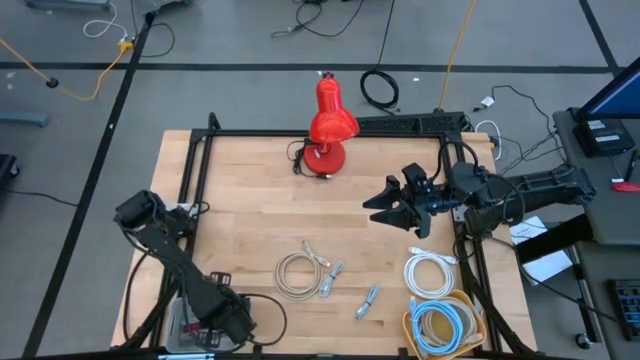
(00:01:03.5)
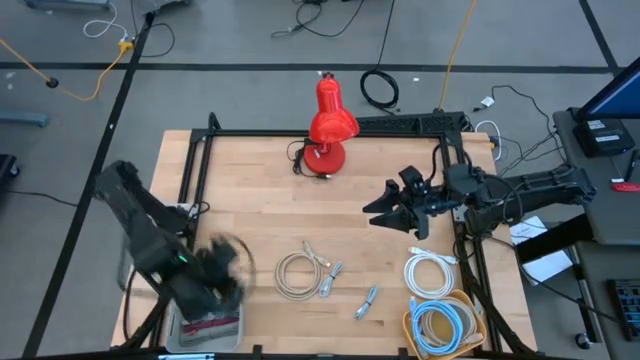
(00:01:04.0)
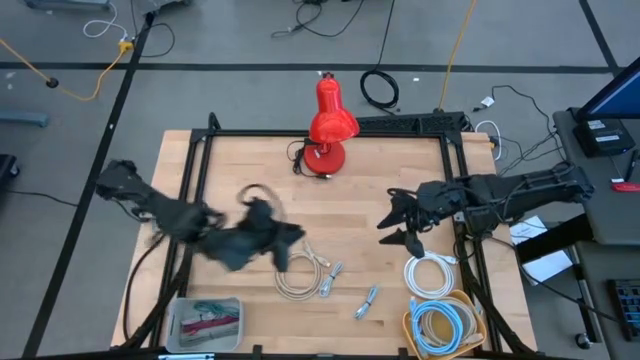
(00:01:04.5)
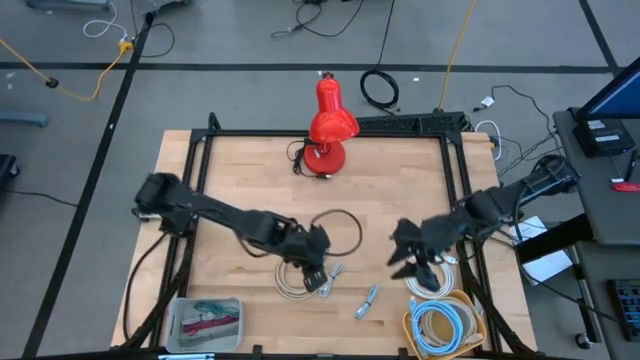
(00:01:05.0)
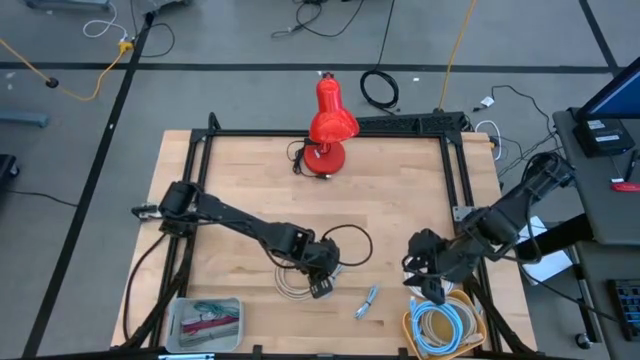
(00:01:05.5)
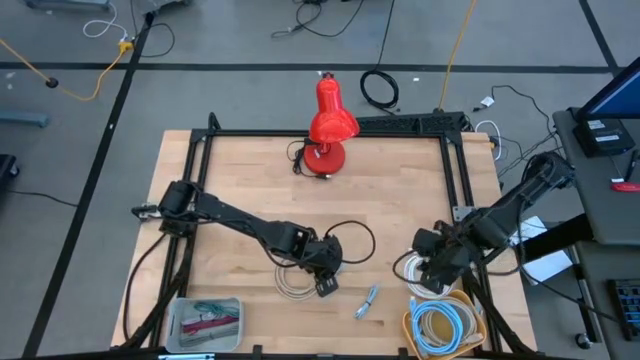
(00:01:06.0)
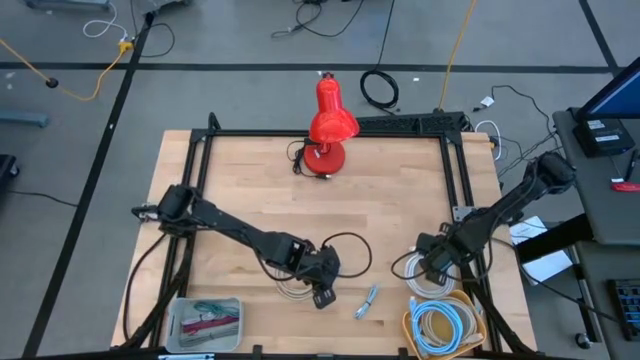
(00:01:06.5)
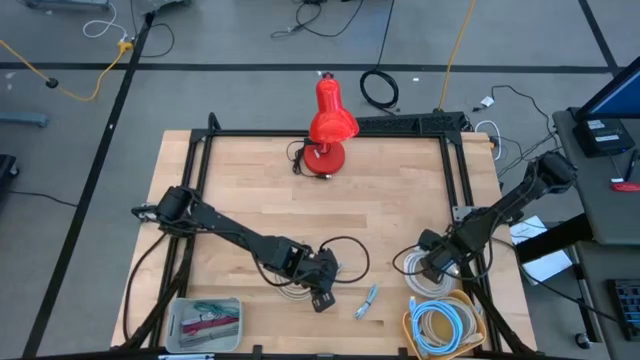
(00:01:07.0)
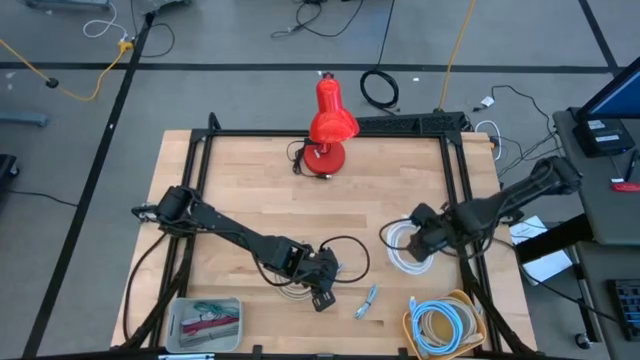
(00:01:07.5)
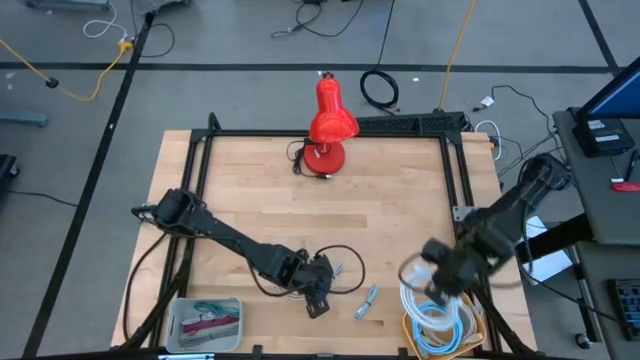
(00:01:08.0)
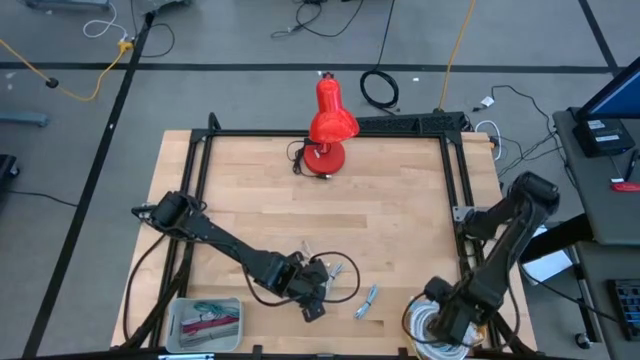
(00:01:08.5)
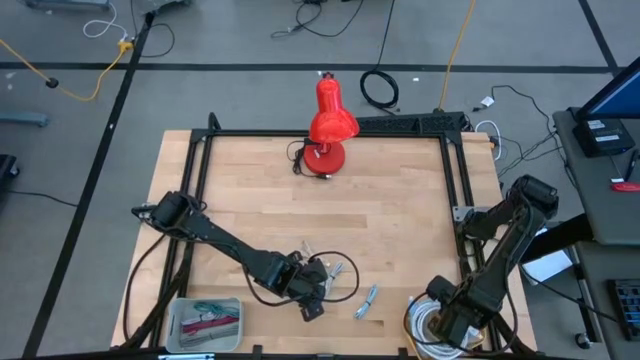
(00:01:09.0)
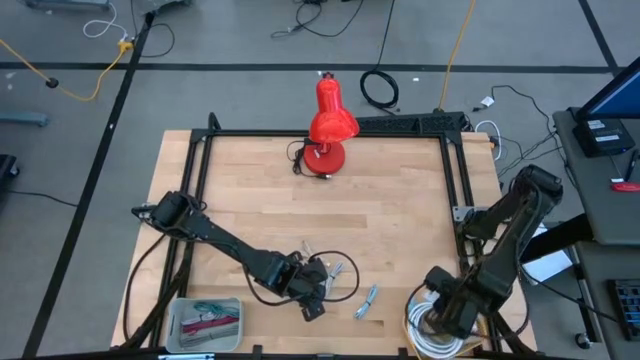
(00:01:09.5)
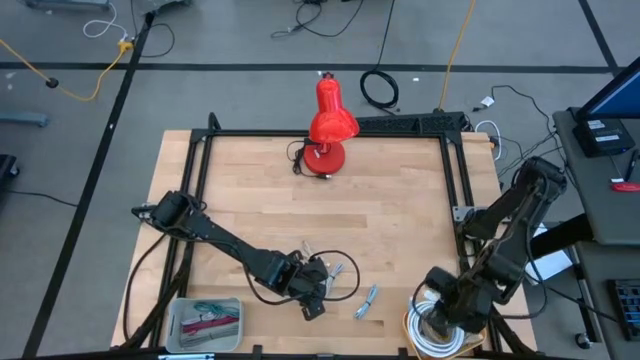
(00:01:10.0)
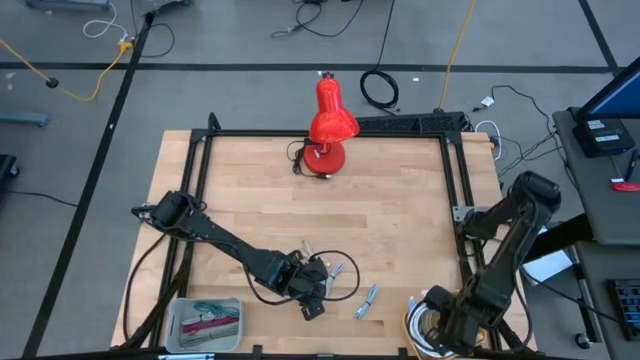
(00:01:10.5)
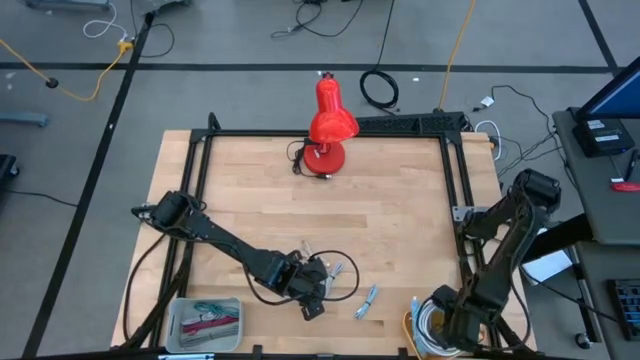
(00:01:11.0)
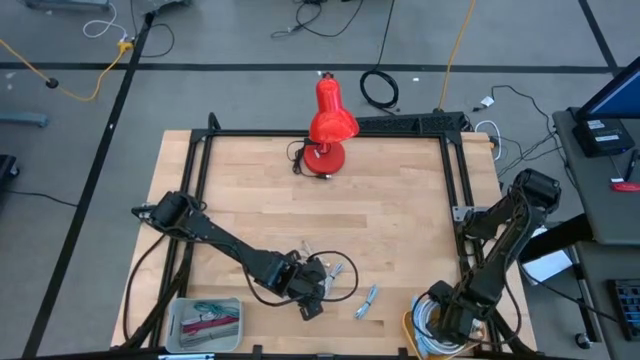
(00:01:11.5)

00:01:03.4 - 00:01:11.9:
Task: Pick & Place USB Port
Put the white HDMI cable into the yellow bin

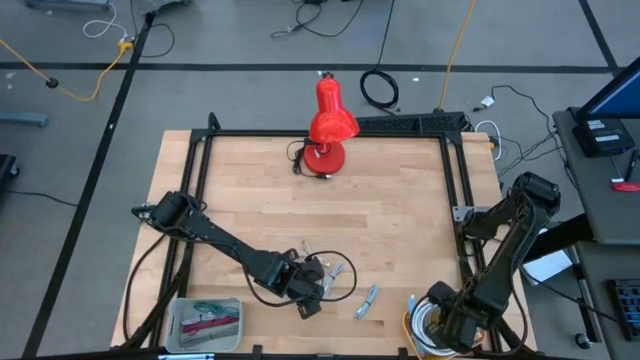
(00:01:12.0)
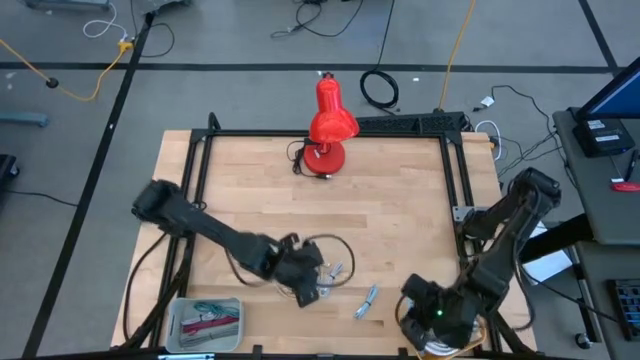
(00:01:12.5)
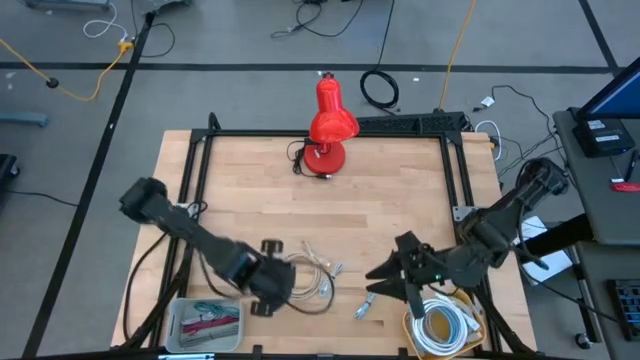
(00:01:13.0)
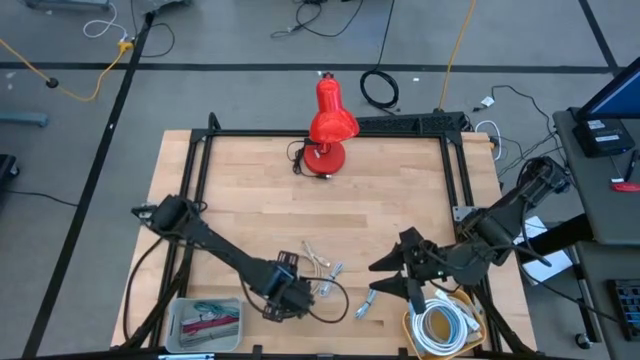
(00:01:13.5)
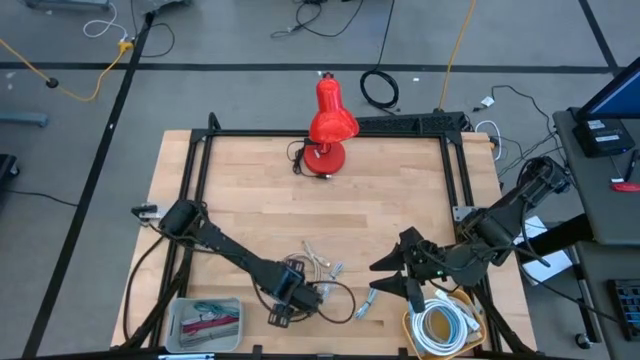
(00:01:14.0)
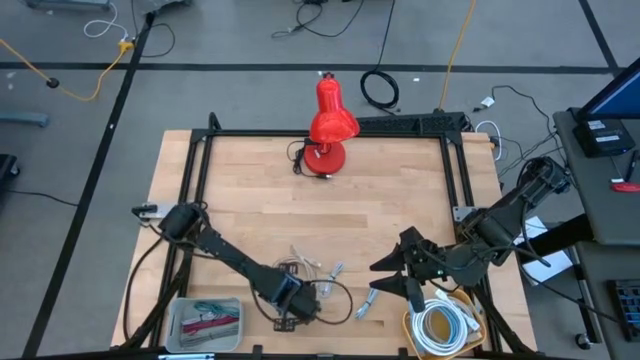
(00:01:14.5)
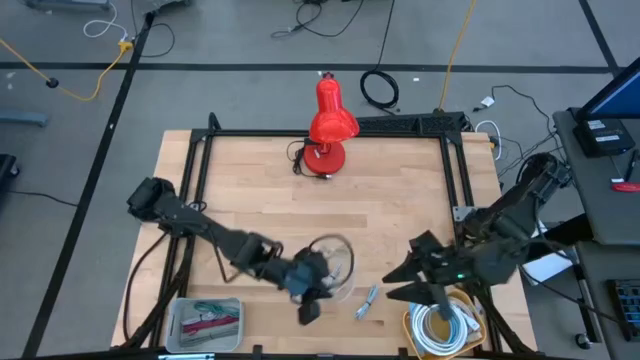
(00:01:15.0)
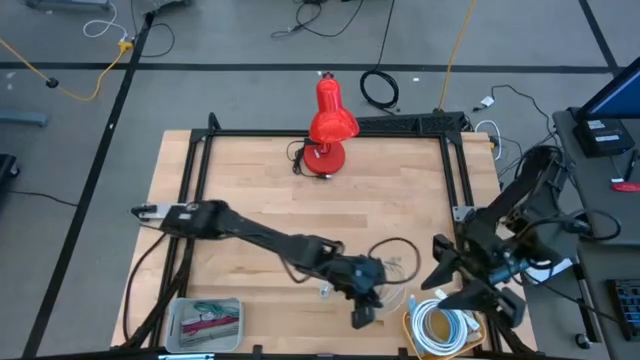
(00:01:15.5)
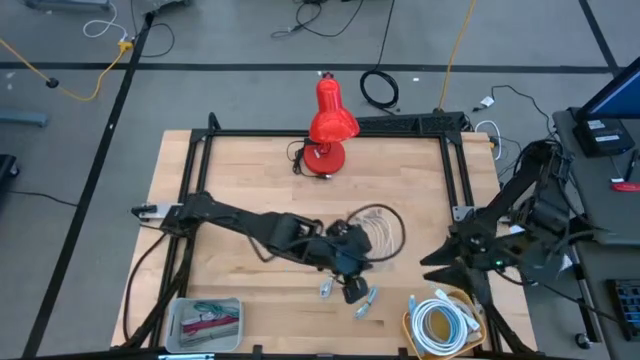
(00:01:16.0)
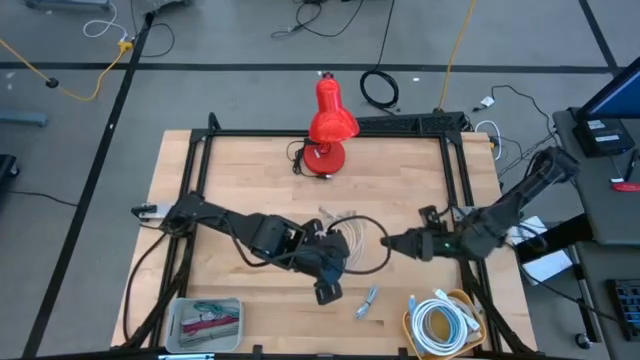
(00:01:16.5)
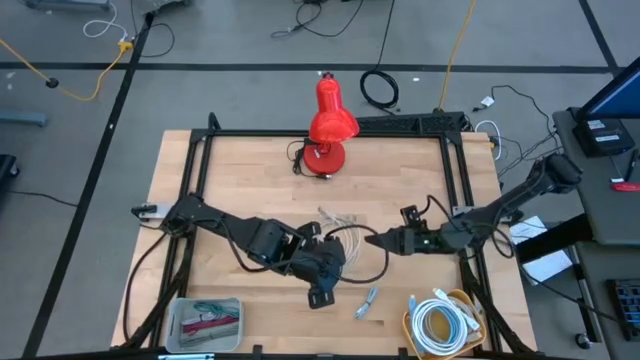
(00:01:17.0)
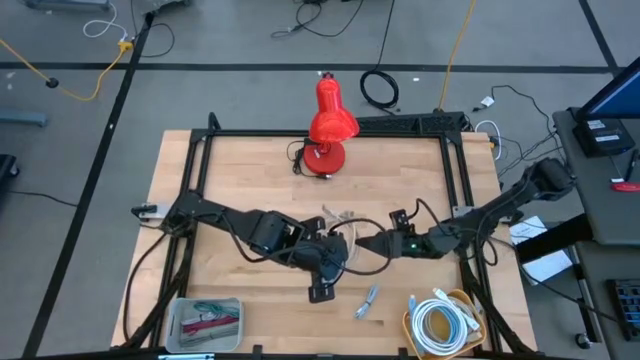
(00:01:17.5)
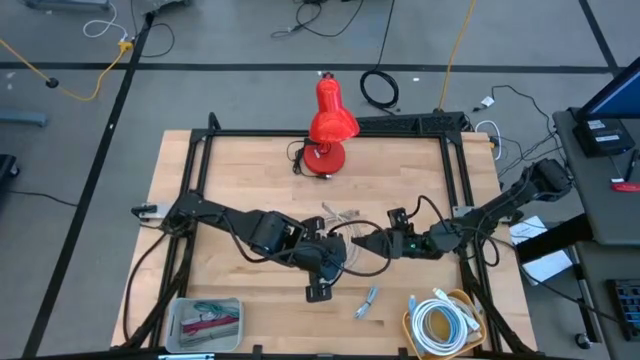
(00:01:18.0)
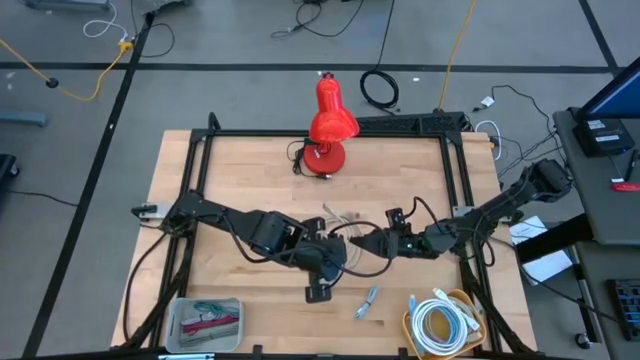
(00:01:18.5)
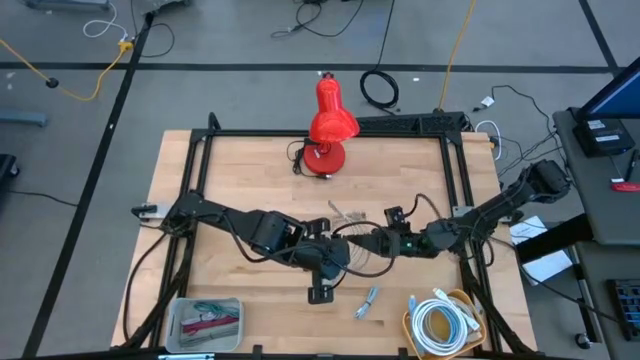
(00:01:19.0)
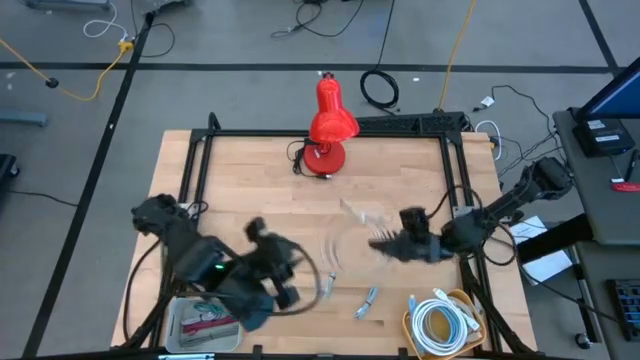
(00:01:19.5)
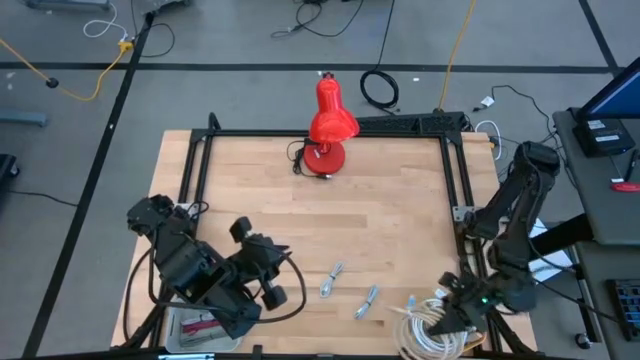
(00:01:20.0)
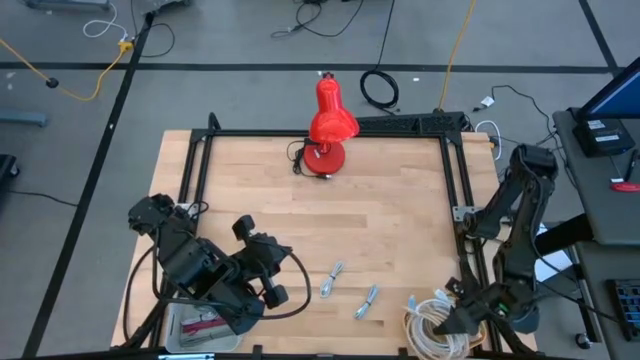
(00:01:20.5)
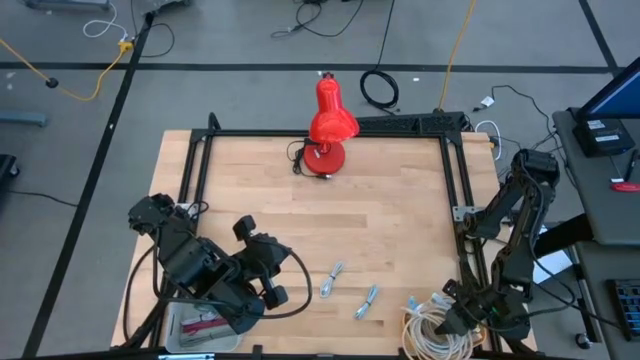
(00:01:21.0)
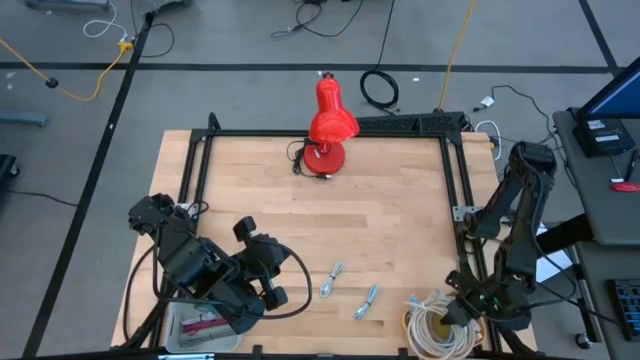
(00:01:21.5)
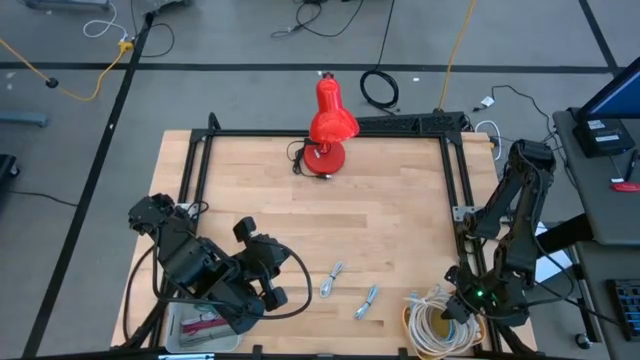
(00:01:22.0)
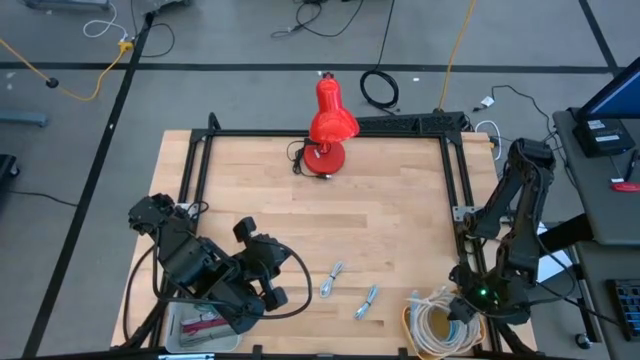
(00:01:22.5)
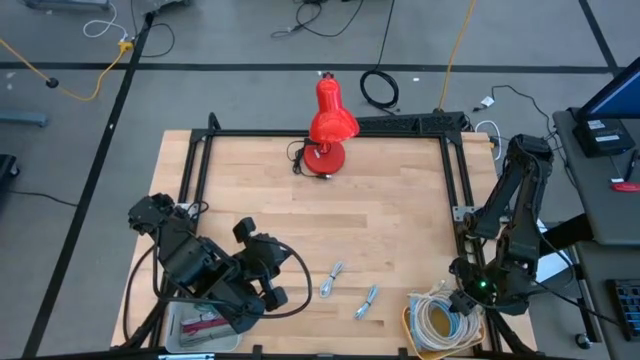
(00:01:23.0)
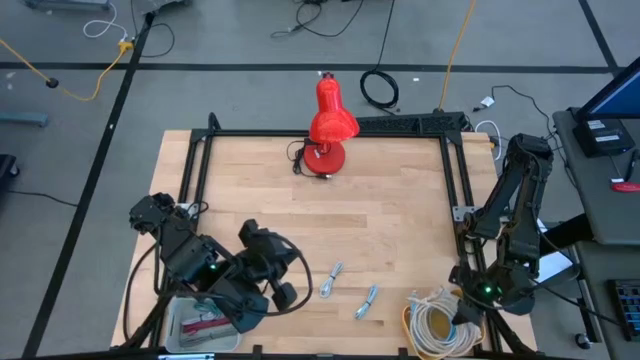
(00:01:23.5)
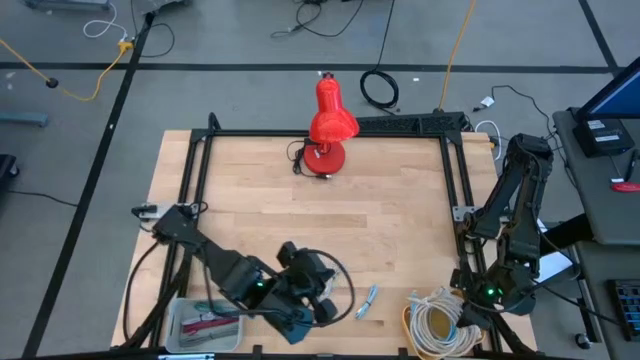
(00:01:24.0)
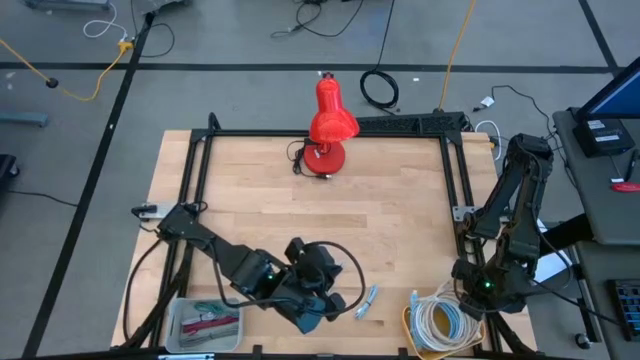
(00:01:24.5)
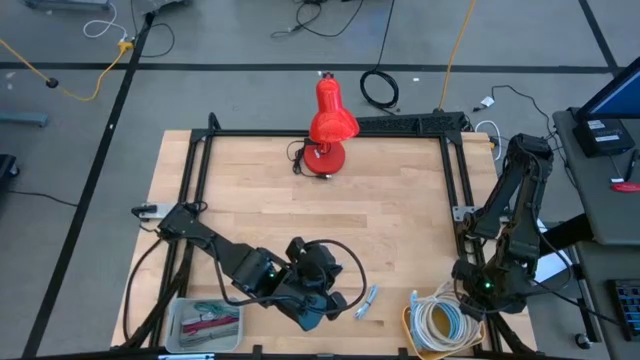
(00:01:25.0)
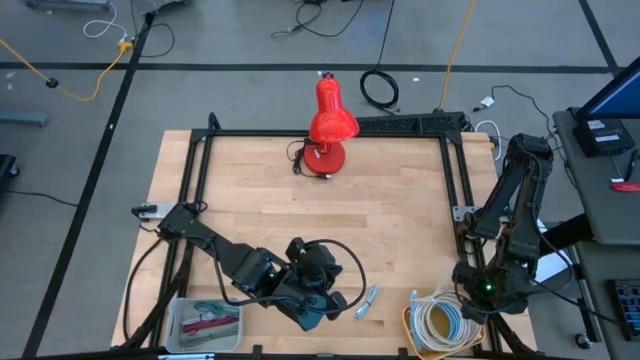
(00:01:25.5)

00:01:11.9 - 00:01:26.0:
Put the light brown HDMI cable into the yellow bin
